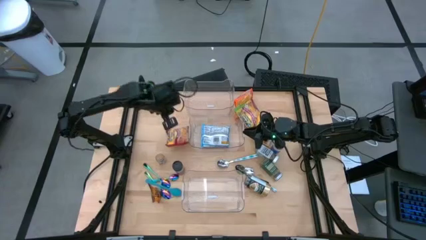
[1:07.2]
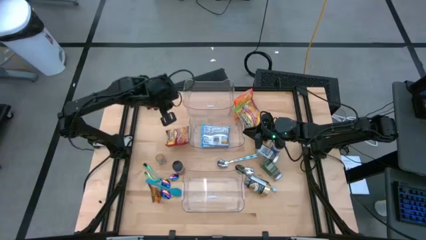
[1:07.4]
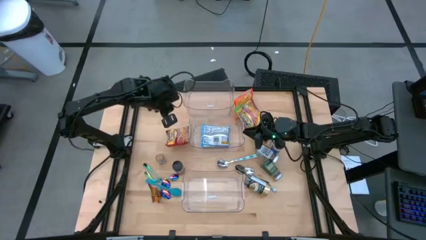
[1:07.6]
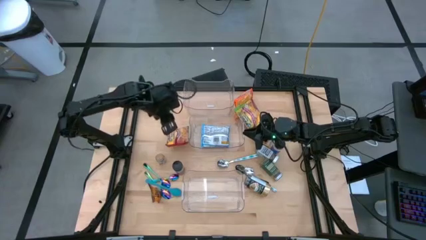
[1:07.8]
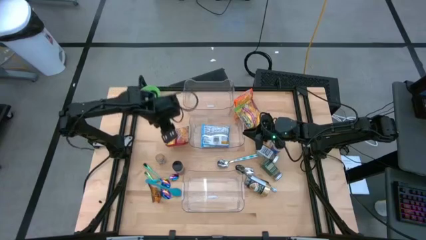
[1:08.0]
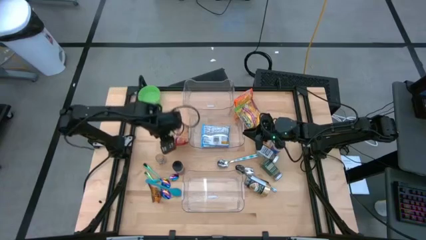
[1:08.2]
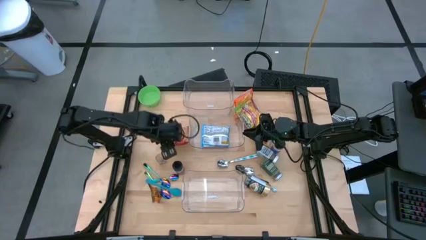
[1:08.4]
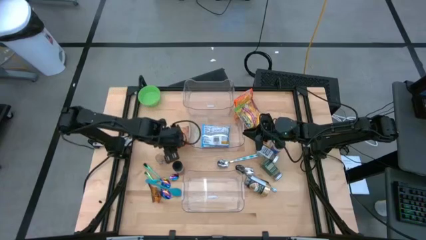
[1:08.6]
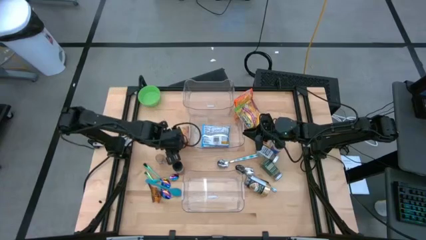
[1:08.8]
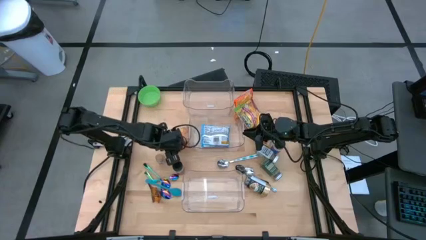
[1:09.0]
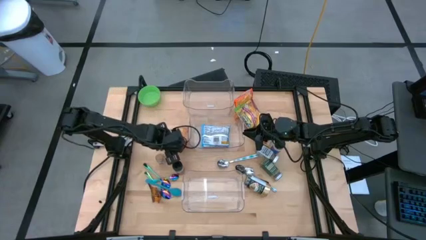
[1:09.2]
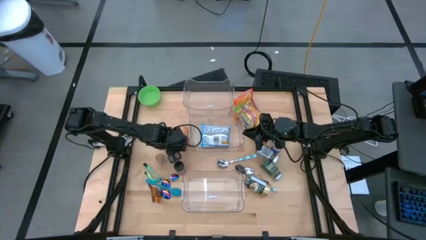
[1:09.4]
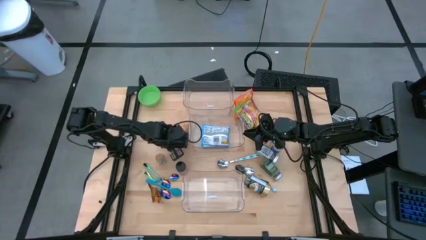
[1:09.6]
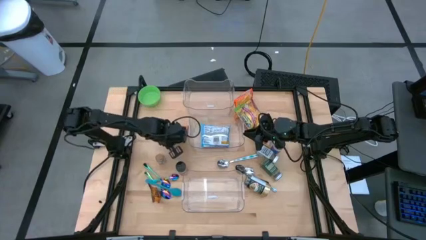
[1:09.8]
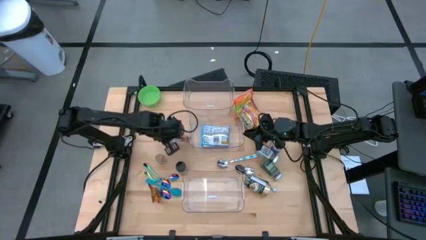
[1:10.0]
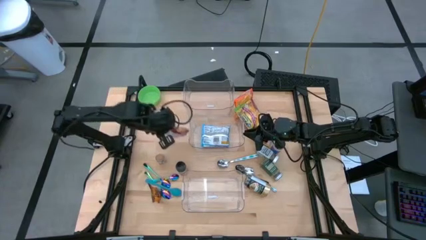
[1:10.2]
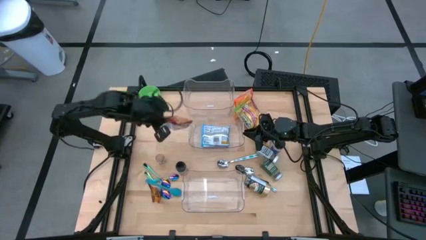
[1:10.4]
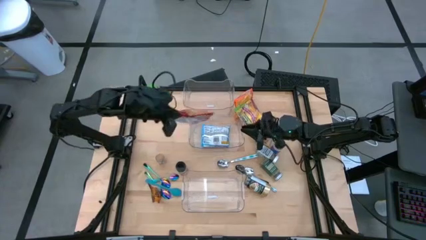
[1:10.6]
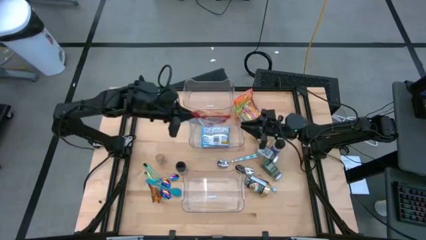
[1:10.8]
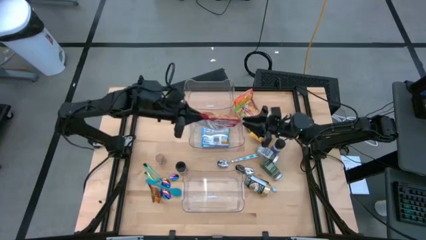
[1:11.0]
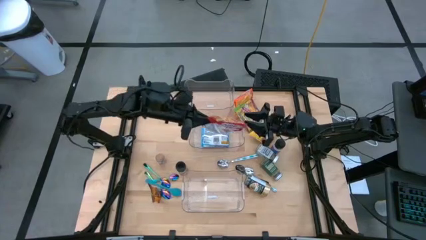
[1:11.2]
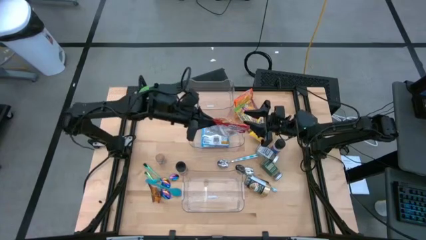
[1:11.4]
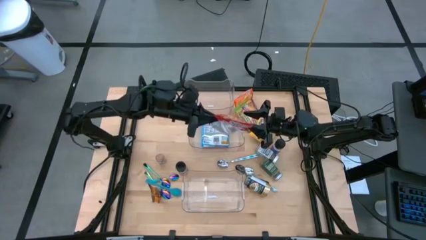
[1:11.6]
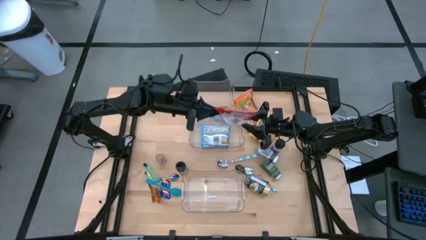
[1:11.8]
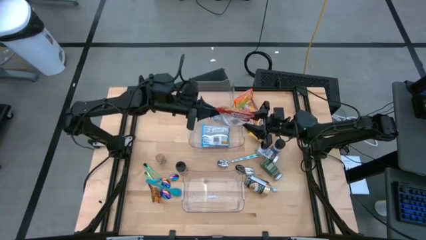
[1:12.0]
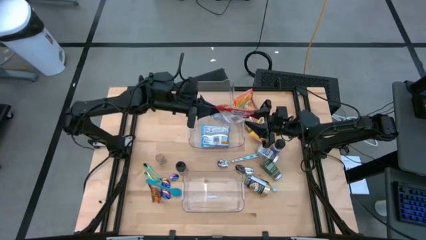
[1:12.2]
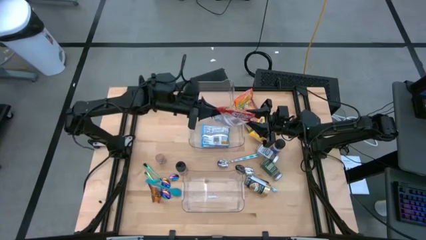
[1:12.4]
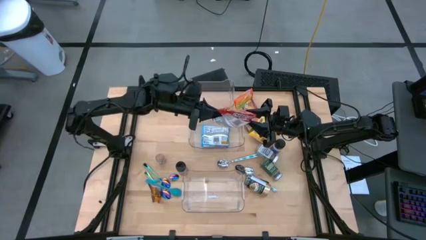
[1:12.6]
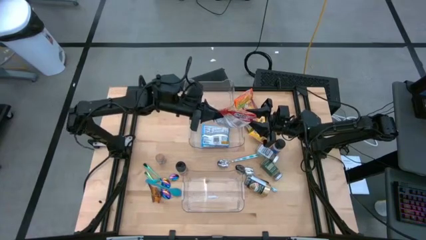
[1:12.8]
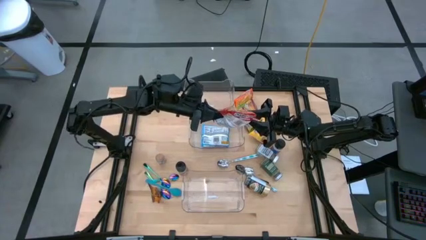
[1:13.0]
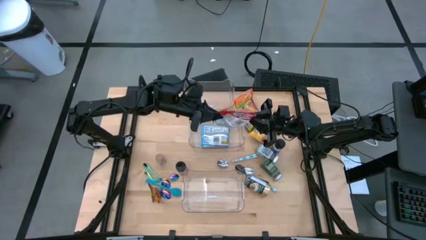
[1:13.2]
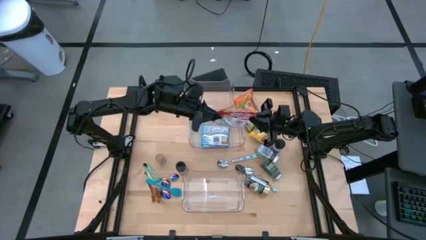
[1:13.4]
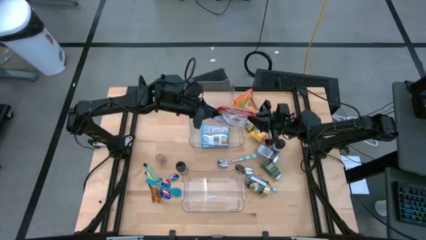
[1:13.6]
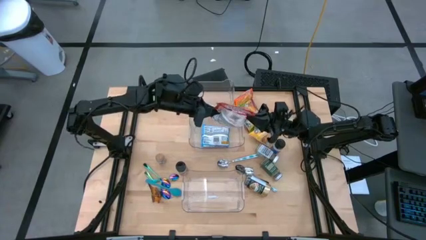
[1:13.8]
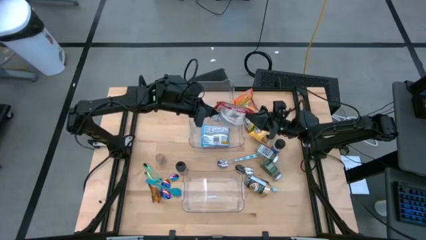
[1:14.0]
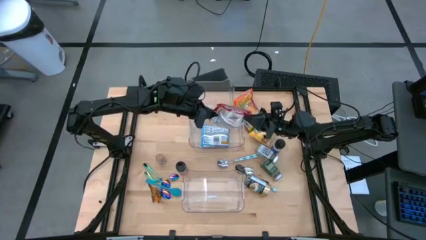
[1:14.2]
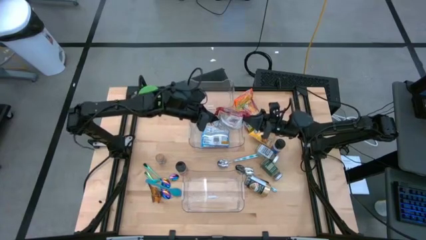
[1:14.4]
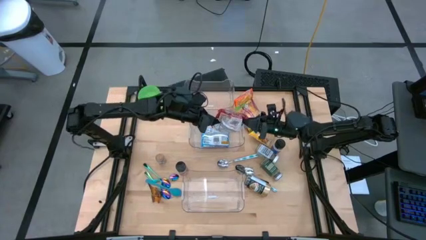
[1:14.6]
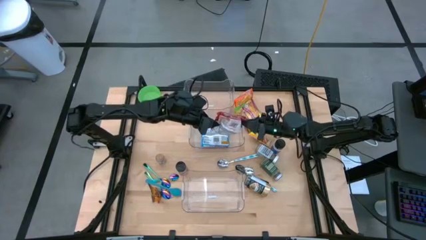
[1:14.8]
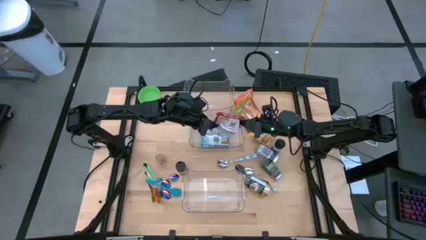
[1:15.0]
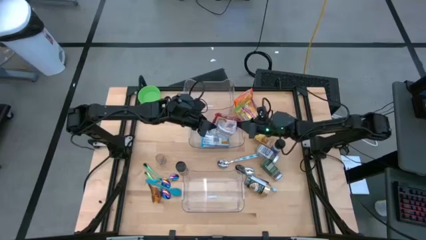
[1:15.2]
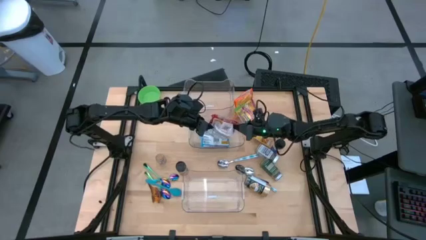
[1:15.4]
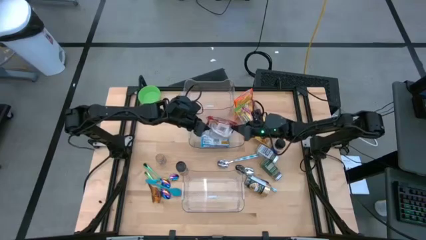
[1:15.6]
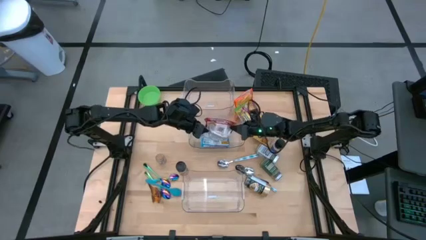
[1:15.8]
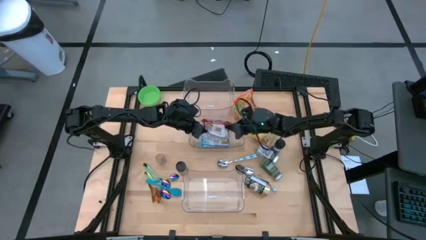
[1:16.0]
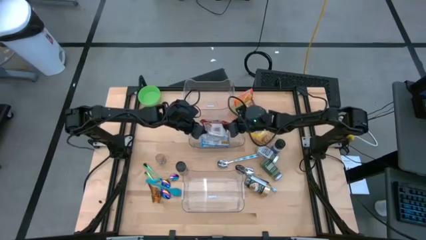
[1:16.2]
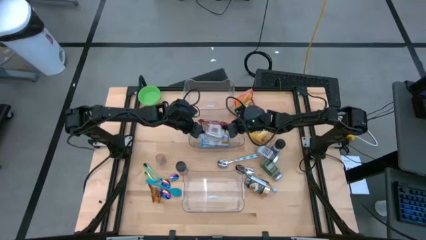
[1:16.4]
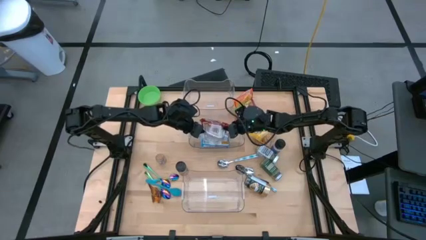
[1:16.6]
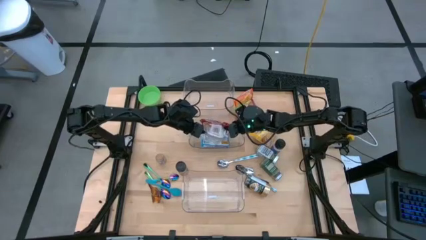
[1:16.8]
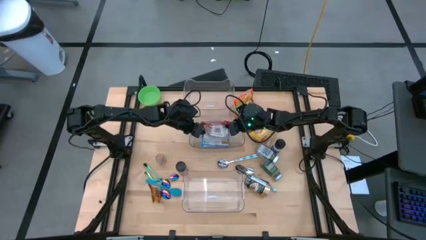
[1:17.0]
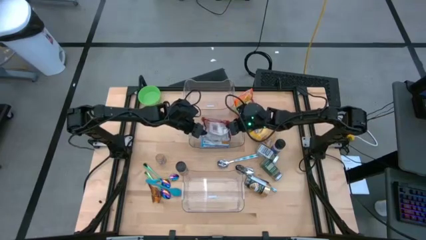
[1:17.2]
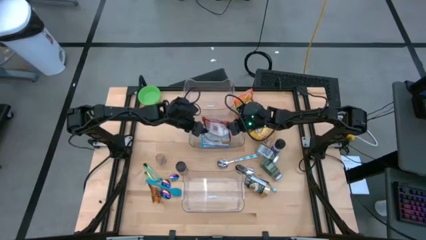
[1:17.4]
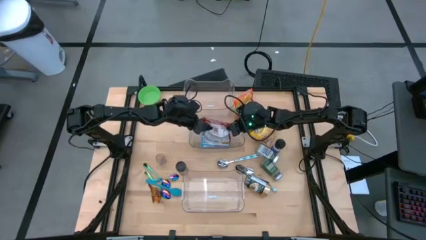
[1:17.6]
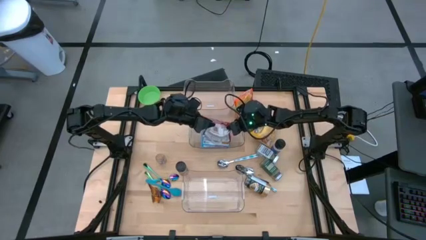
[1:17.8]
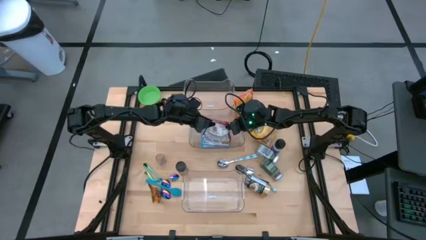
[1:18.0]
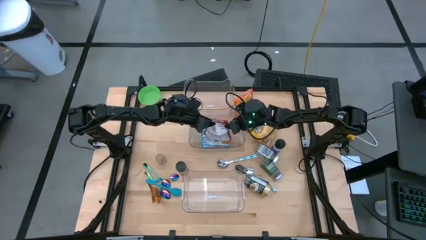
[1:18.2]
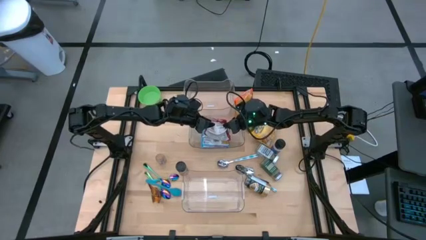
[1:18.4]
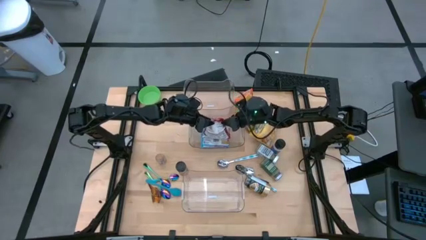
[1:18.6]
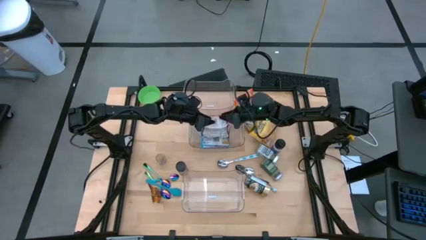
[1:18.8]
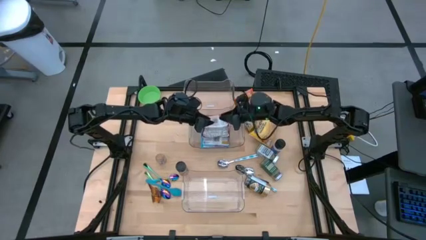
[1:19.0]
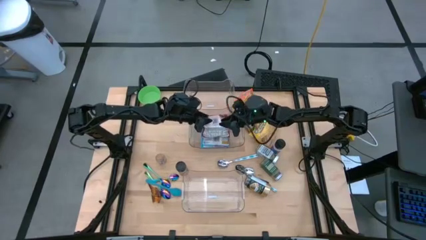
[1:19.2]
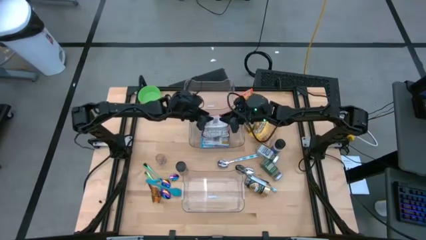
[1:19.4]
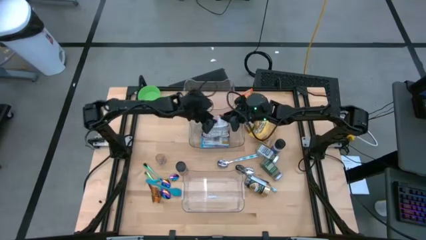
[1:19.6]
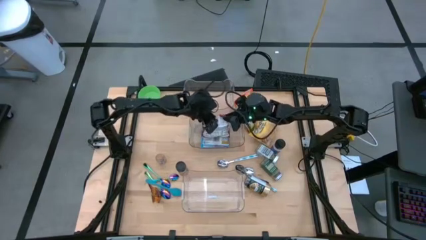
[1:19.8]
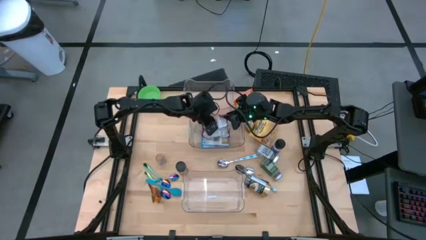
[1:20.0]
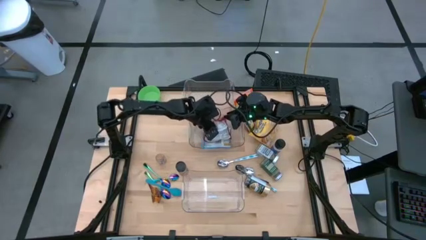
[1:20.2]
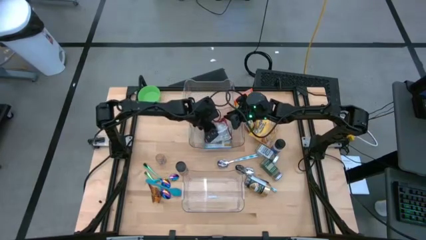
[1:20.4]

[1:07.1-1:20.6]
Task: Pick & Place Food Item
Put the red noodle pack into the middle transparent bin
